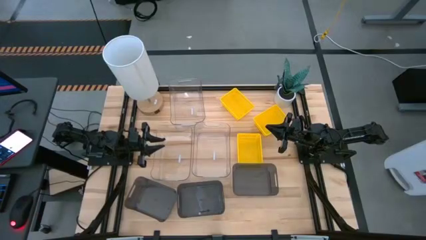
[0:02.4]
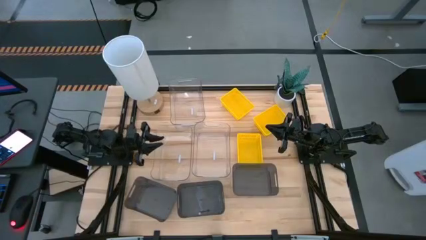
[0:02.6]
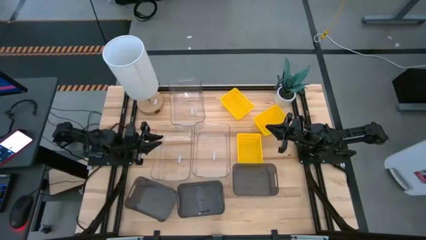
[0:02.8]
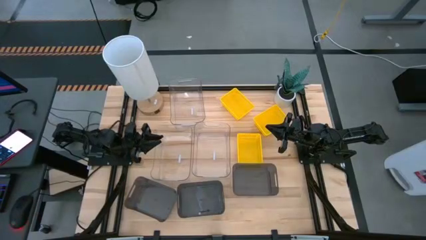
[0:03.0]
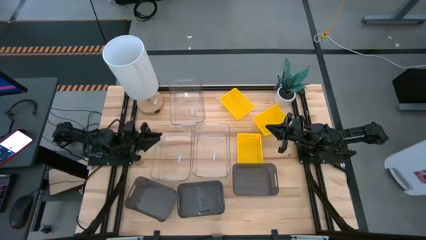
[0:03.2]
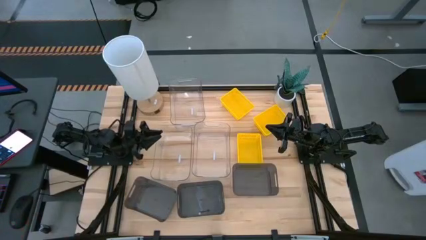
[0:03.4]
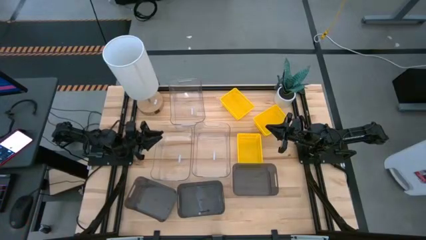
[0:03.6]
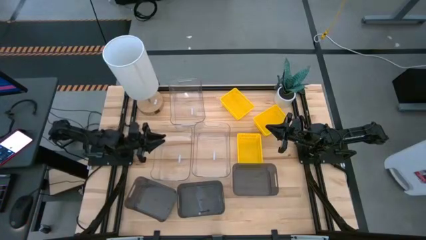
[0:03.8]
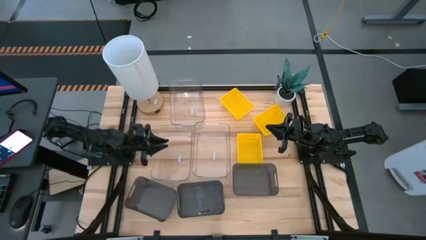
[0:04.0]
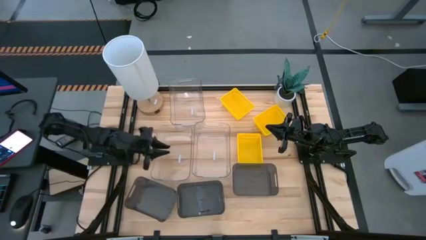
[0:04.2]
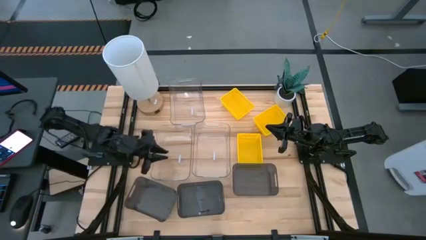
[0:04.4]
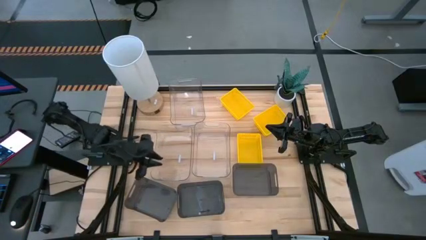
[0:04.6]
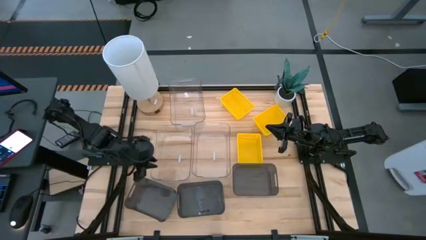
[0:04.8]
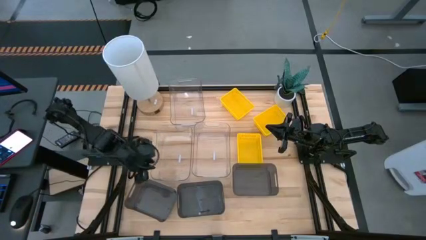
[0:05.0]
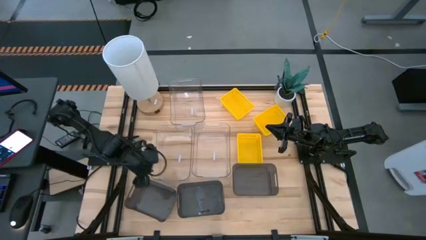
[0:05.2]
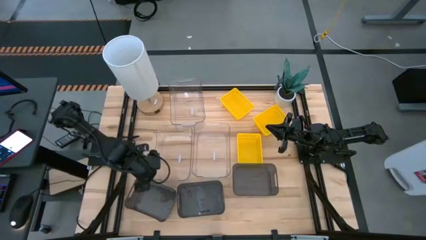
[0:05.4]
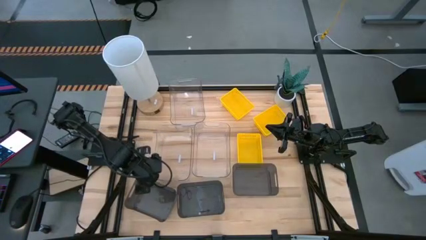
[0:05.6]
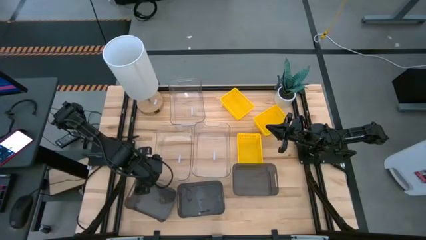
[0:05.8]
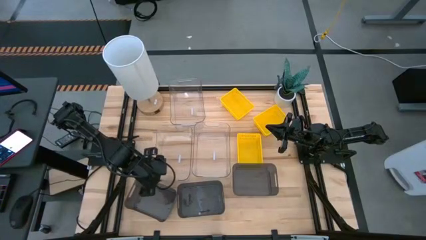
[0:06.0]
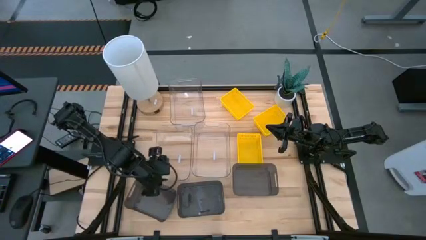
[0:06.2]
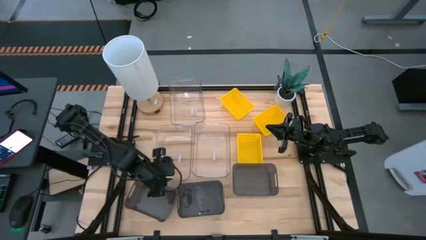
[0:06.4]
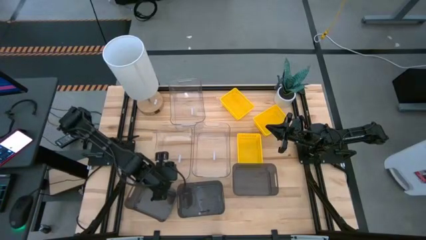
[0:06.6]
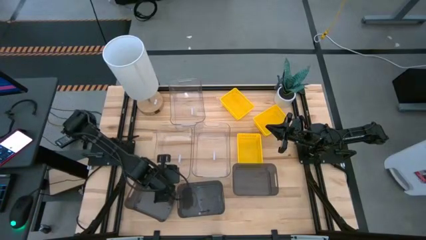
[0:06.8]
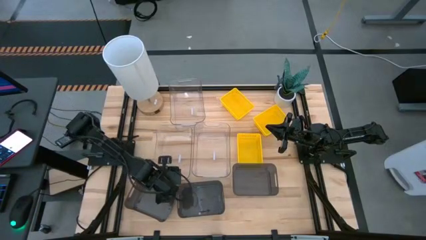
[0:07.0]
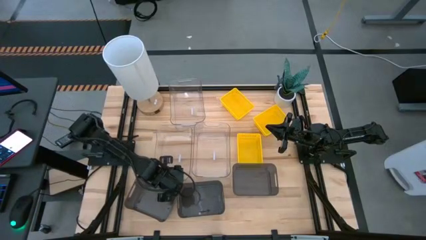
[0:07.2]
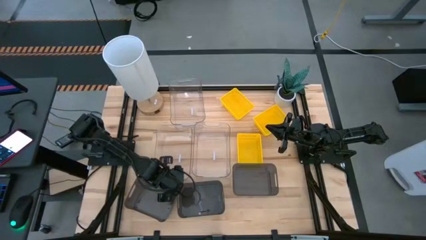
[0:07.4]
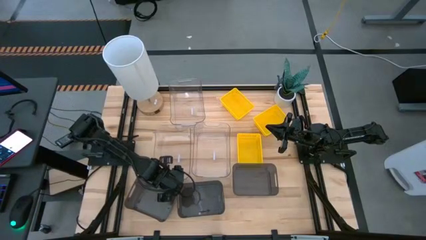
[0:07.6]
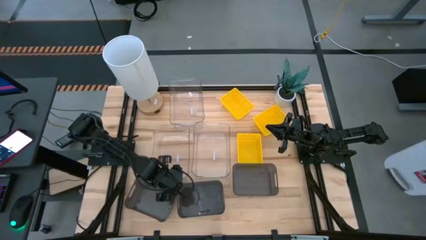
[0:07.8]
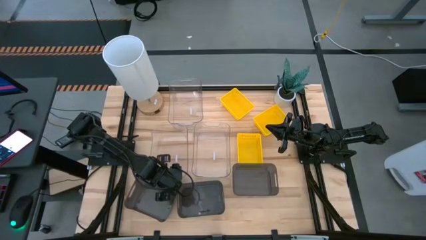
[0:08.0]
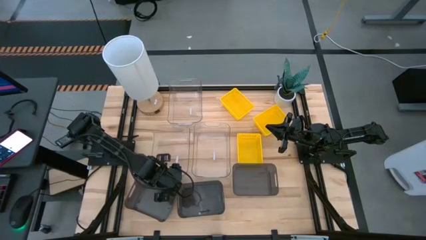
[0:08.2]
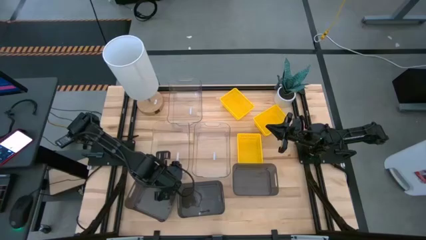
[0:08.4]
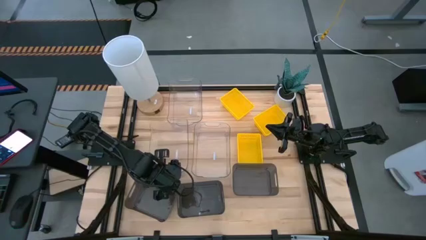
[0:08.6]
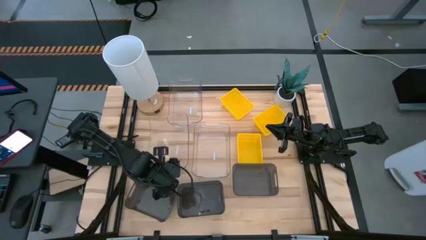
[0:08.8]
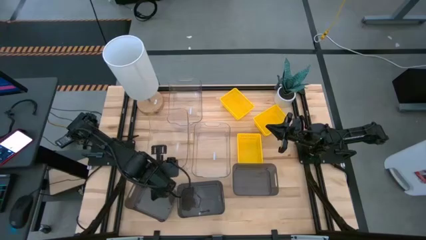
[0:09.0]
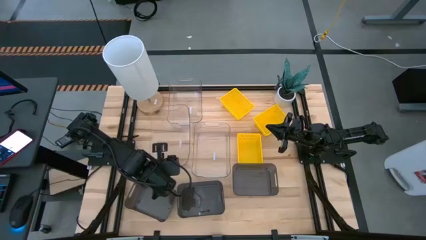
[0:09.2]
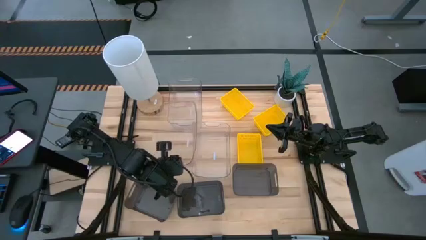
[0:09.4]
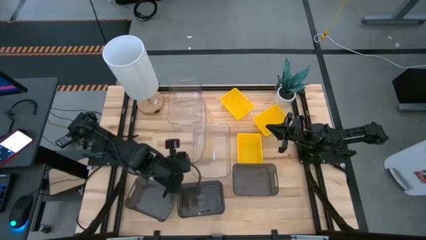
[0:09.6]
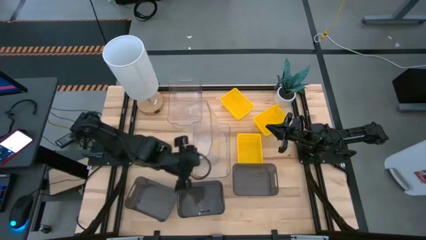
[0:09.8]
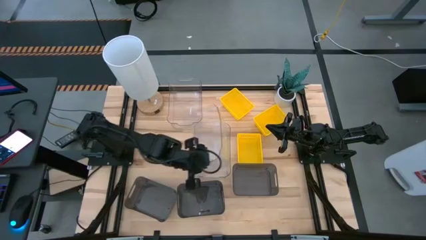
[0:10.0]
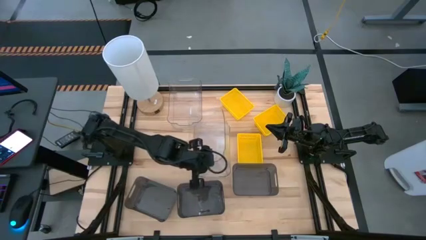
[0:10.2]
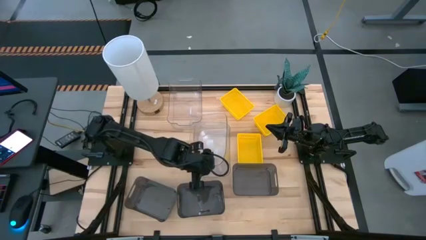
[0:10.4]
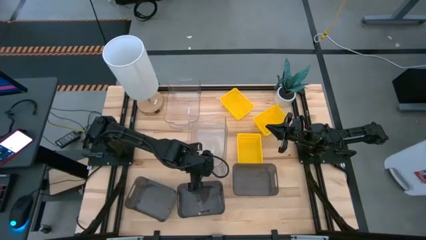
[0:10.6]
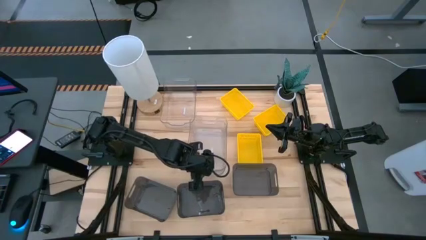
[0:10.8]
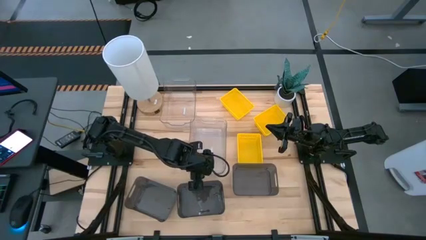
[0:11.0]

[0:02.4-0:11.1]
Stack the bottom left transparent bin on the bottom right transparent bin

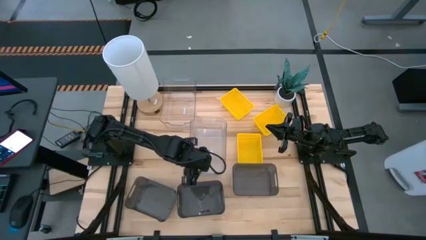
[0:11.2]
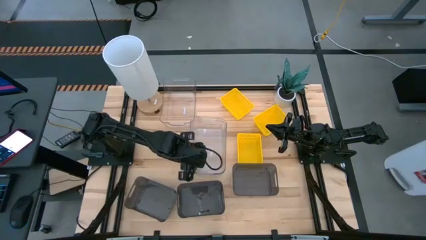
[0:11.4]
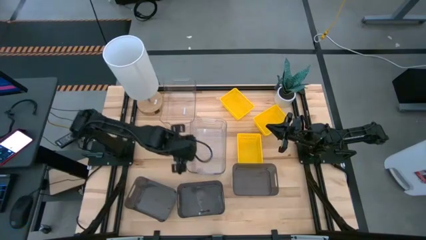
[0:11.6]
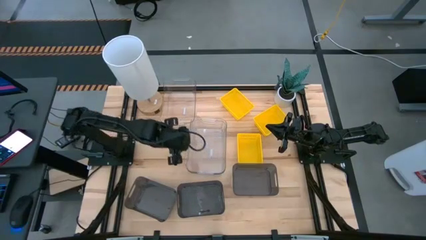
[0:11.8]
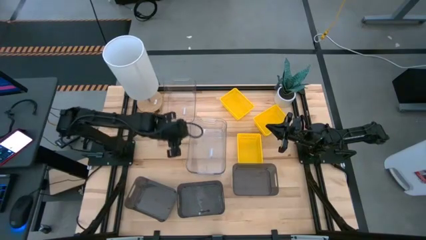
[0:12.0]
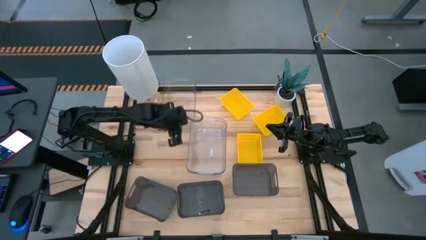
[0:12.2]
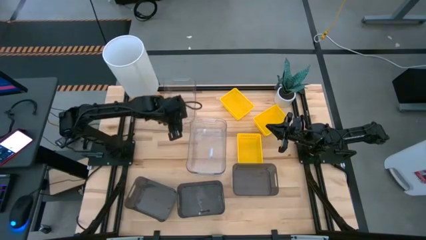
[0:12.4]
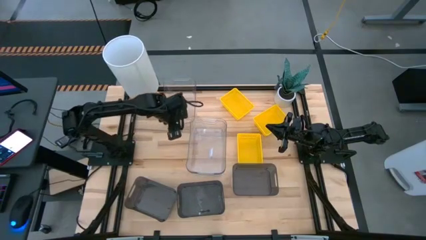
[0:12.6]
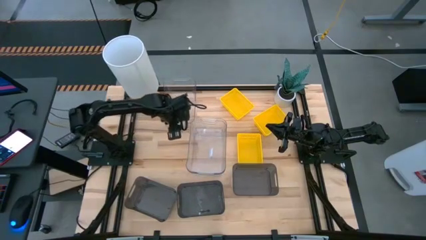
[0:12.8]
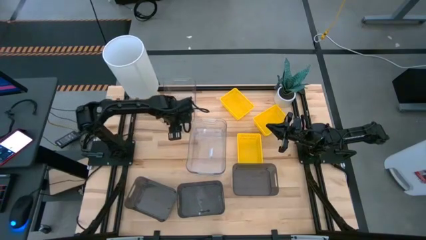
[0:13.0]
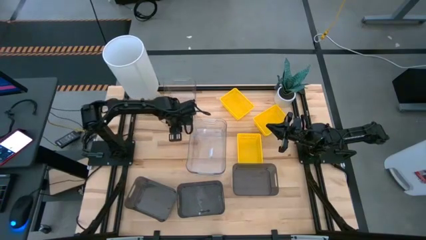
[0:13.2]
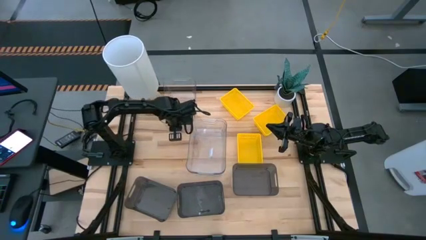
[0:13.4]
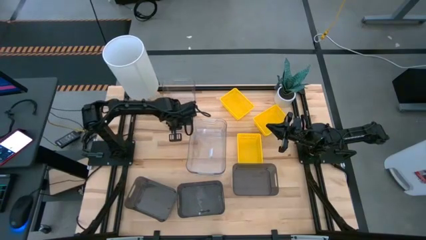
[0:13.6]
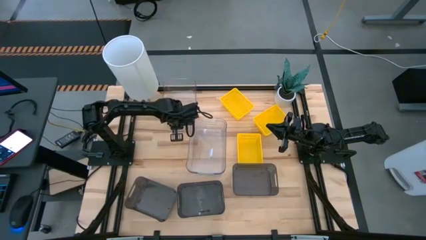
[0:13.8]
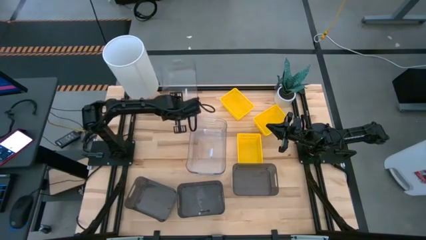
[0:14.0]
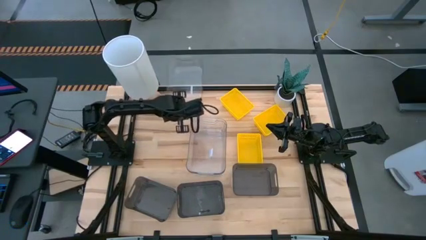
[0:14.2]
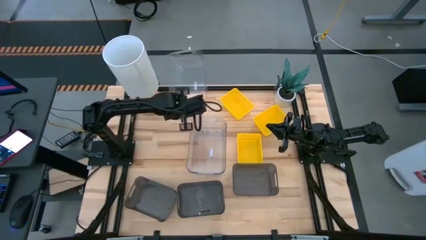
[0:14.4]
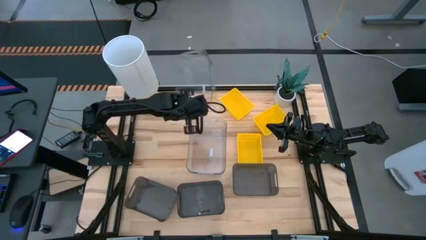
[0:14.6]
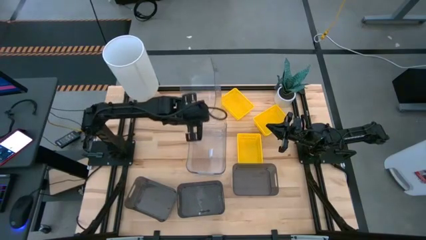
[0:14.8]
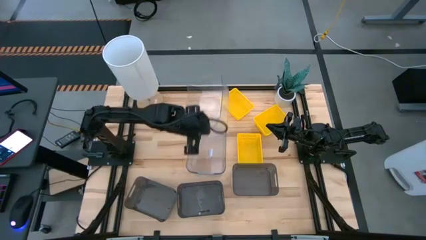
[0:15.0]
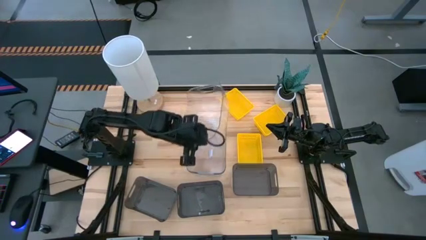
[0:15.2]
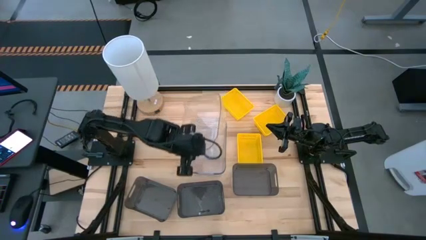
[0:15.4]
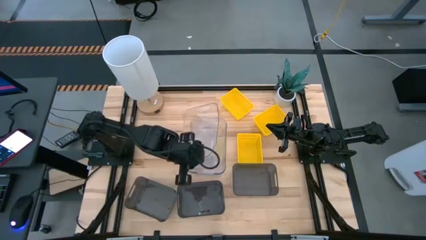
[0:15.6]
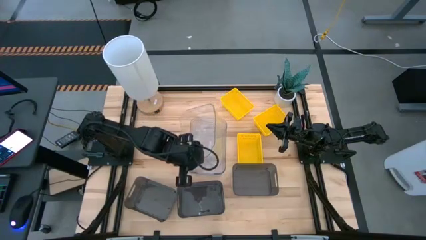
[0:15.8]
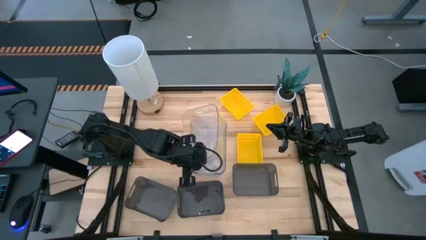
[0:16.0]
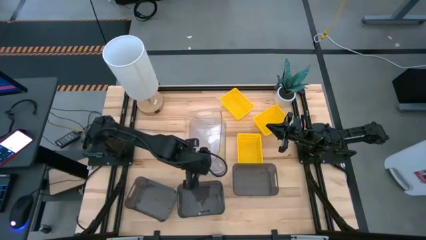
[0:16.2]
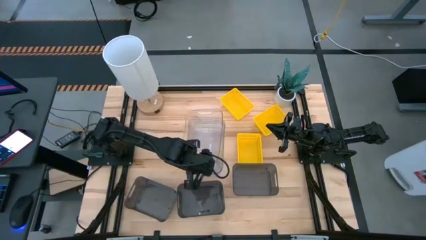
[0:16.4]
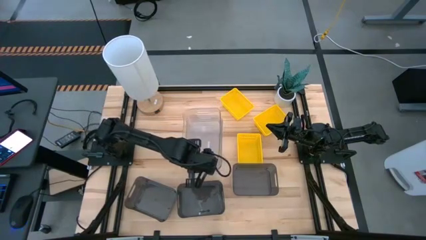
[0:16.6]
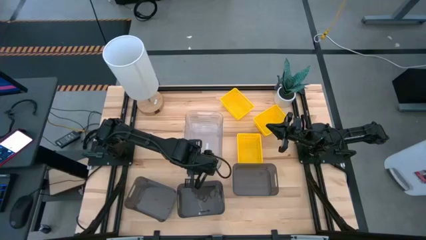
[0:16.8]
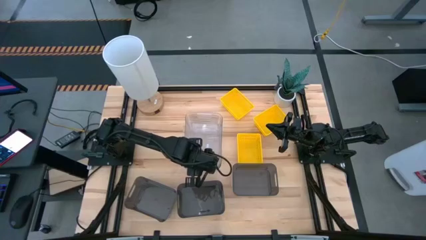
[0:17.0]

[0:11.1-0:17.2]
Stack the top transparent bin on the bottom stacked transparent bins
